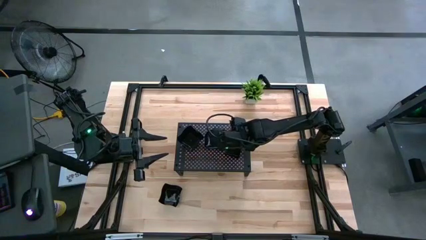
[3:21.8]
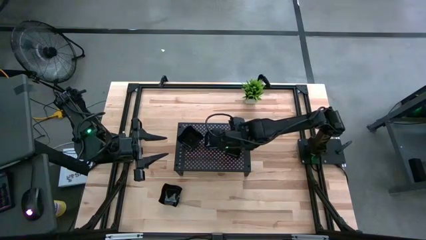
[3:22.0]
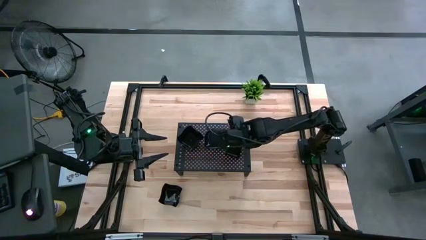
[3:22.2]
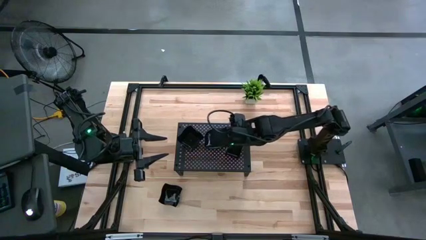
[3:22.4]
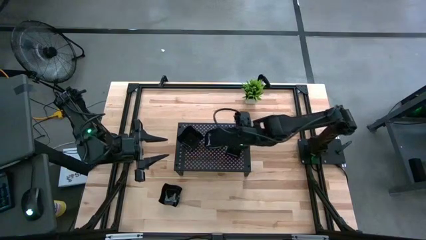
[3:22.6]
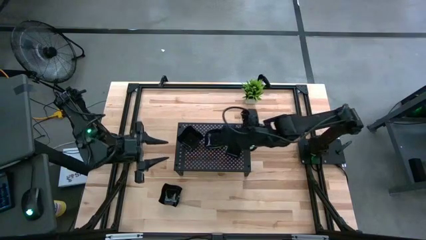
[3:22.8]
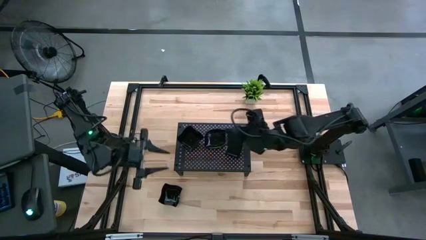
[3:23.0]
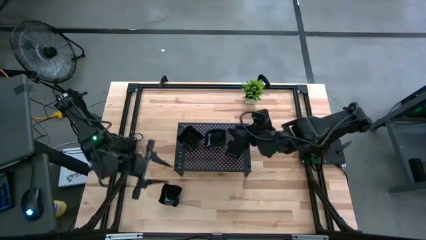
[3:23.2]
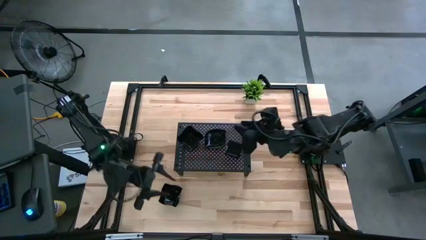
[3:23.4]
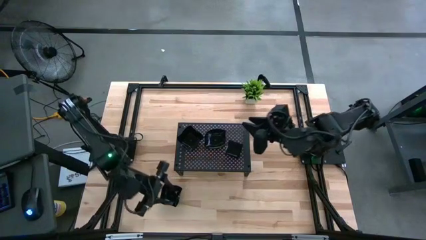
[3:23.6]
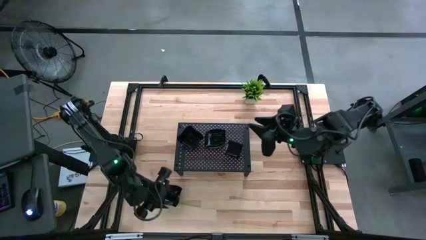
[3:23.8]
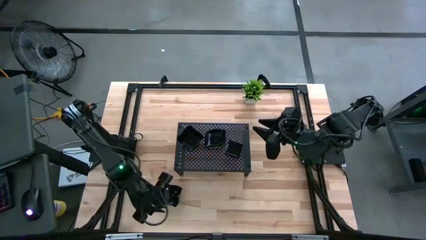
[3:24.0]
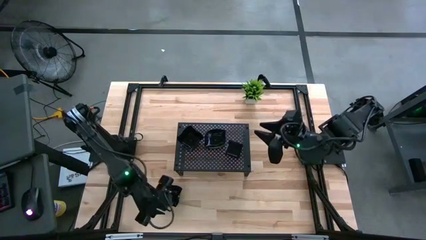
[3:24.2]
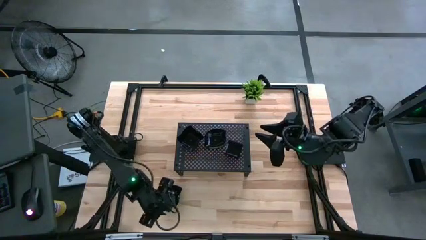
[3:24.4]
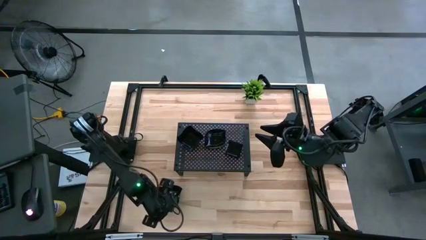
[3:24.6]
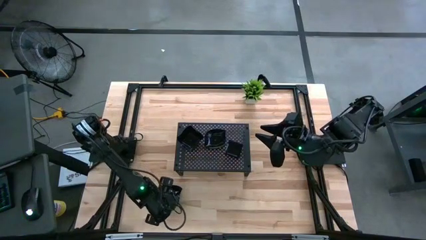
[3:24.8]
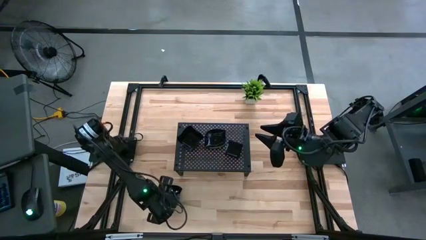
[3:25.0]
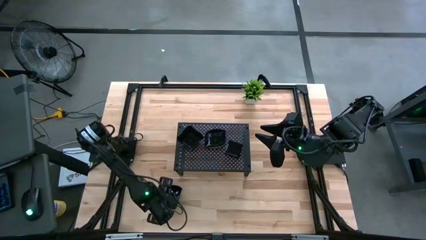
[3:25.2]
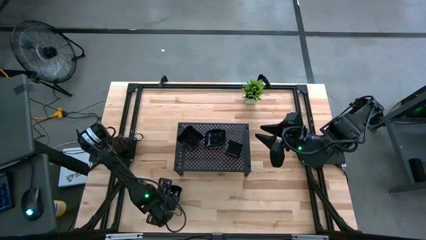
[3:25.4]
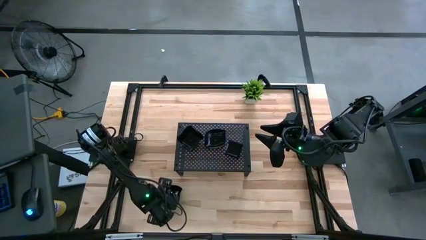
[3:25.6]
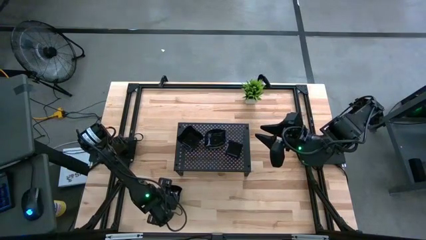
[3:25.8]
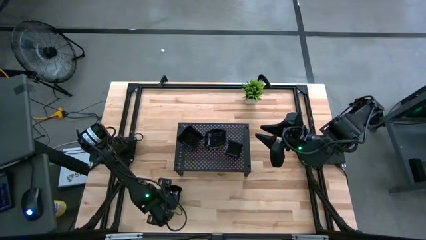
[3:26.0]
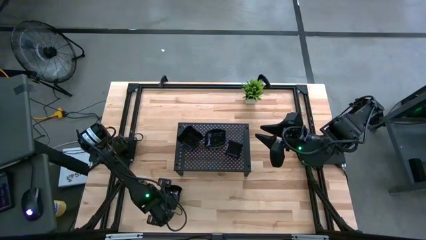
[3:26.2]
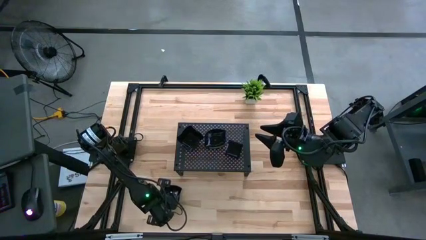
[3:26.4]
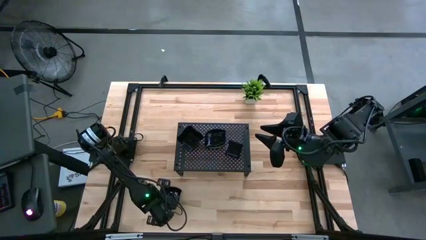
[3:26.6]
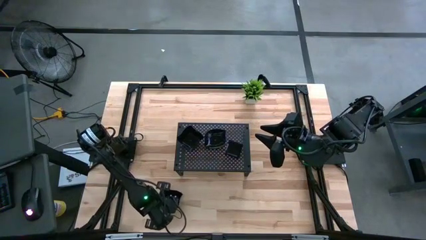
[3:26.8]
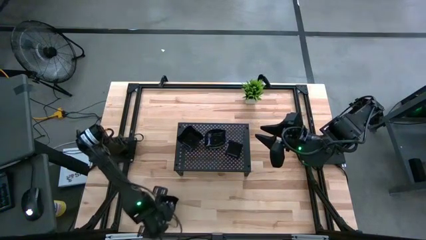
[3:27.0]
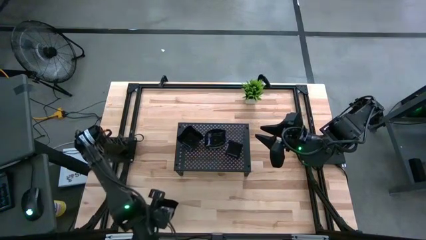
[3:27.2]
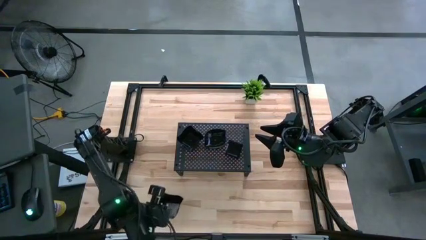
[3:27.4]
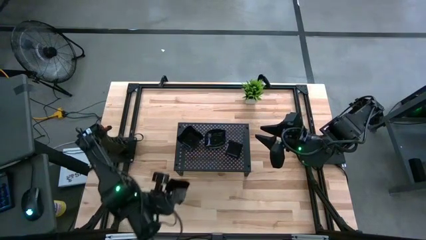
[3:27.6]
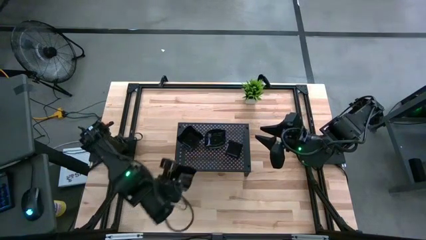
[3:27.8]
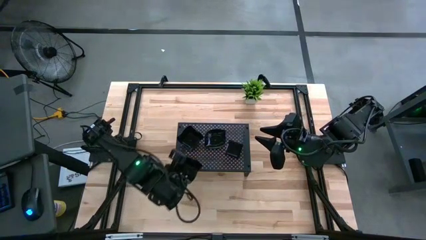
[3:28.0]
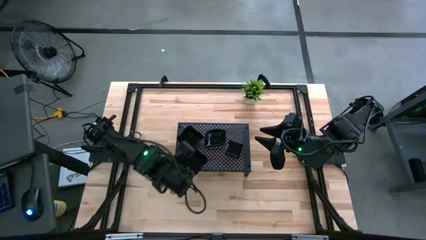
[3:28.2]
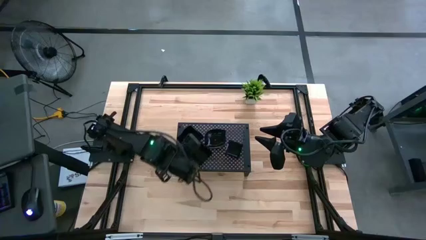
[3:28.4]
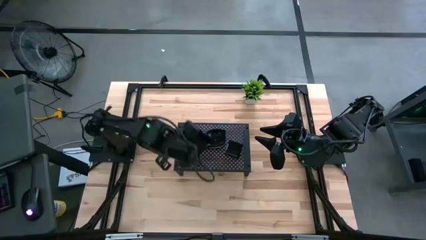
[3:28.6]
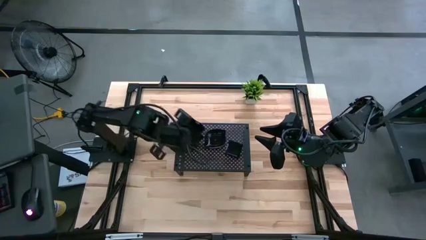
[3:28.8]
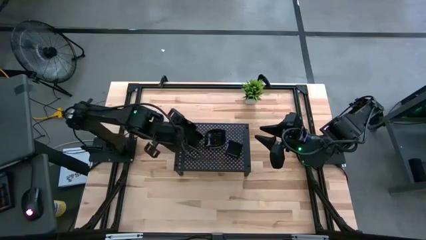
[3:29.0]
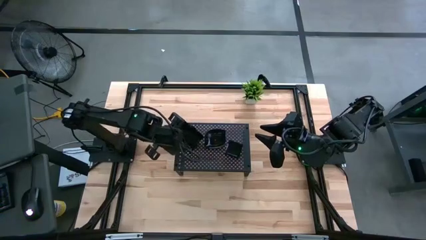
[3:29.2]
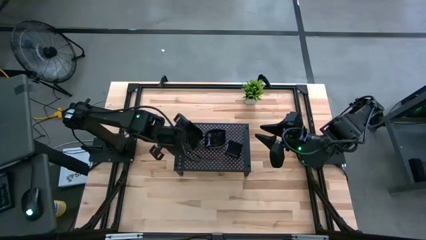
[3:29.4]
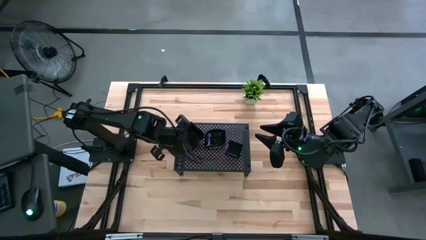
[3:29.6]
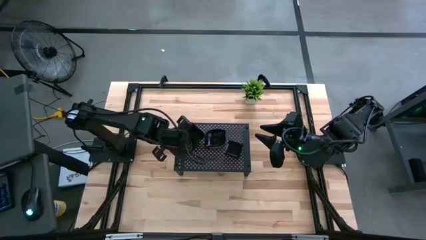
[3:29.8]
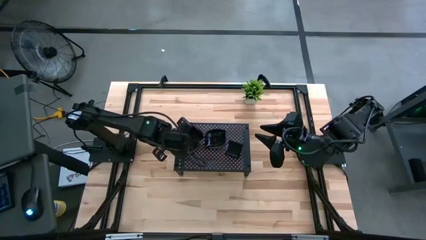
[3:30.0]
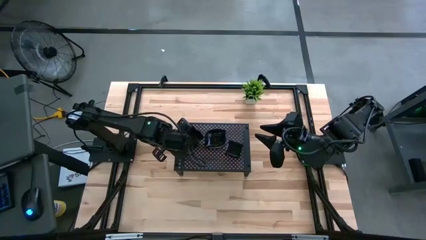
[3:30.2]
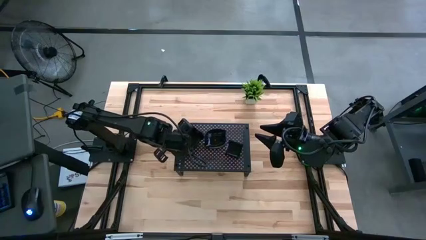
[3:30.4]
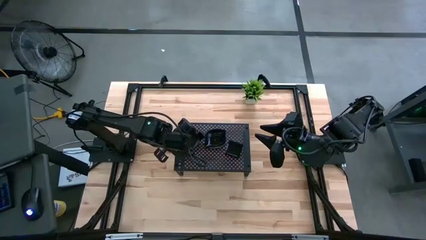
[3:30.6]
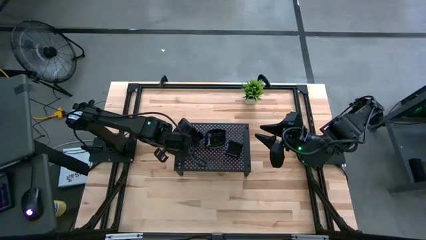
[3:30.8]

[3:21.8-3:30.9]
Task: Pick & Place Mini shaped plates
Stack the distorted square plate on top of the distorted square plates on the shelf

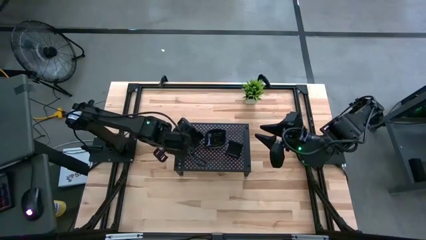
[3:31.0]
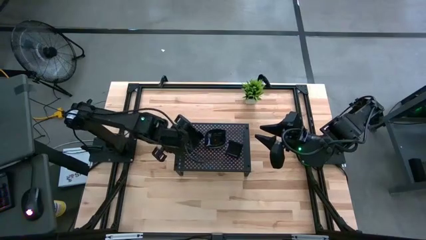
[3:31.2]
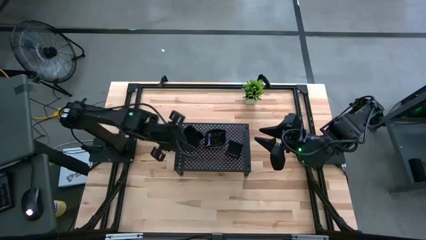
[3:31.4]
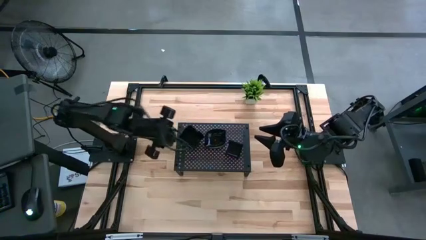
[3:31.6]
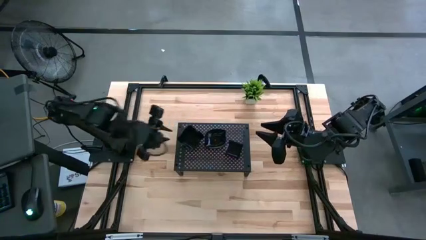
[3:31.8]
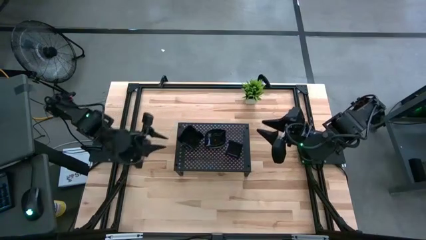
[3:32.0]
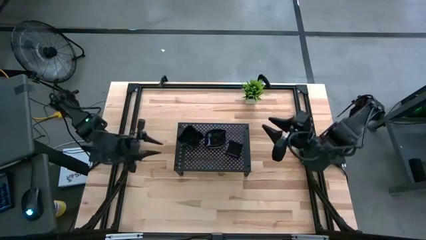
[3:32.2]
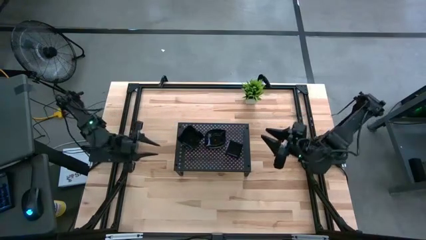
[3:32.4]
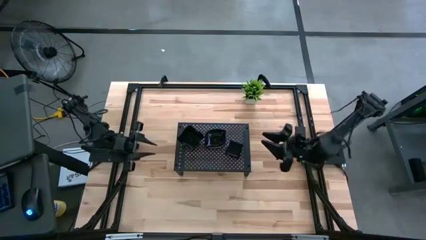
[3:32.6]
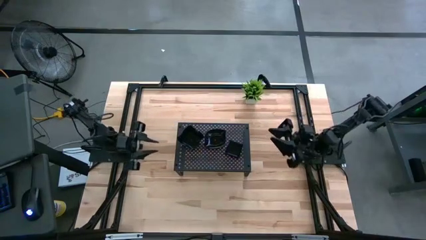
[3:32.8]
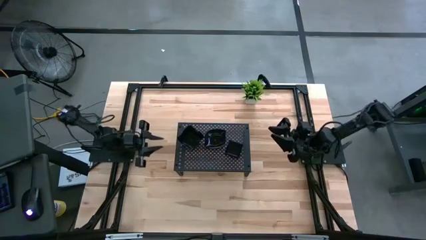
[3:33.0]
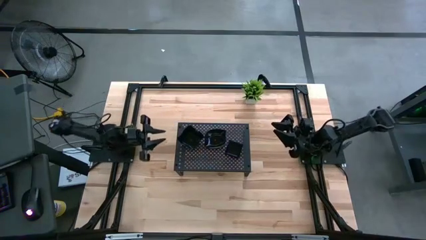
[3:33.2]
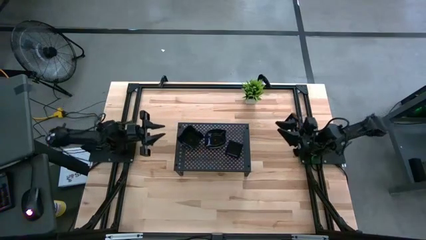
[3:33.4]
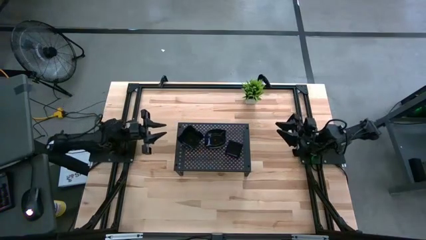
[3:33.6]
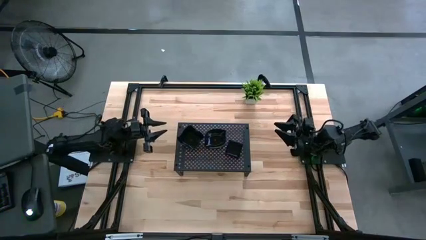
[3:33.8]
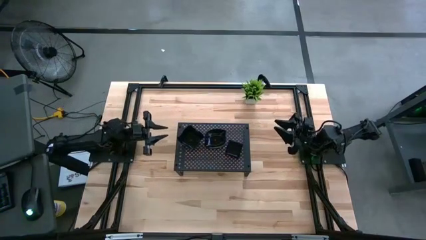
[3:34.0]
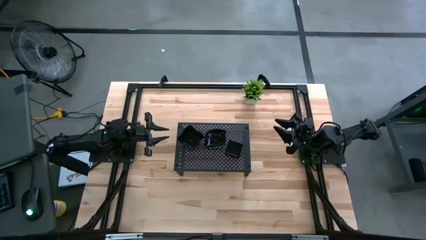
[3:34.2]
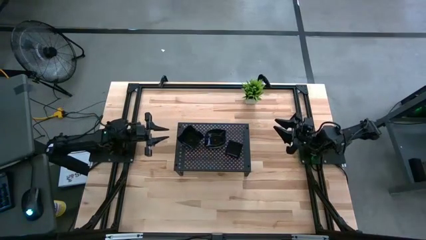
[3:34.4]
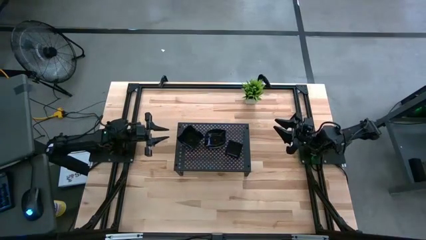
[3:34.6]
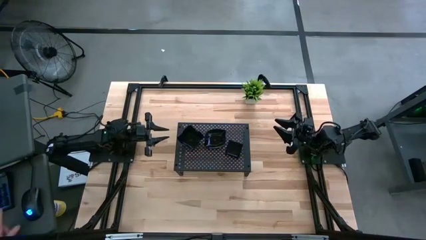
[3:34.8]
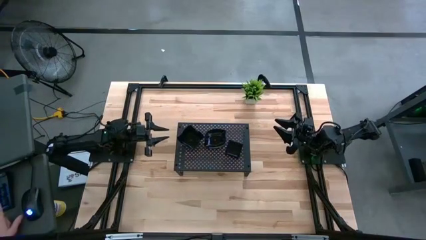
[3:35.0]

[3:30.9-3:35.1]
Return to Home Position
